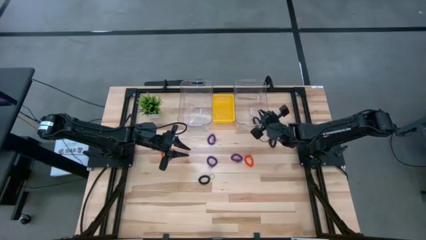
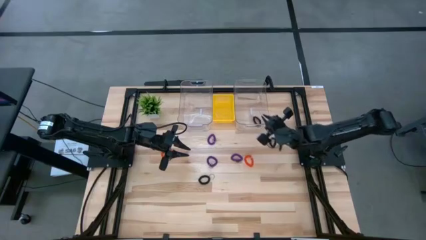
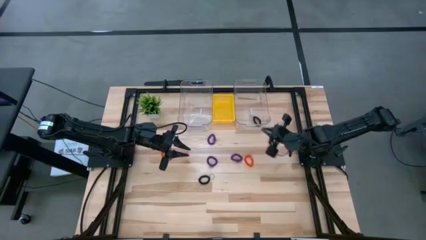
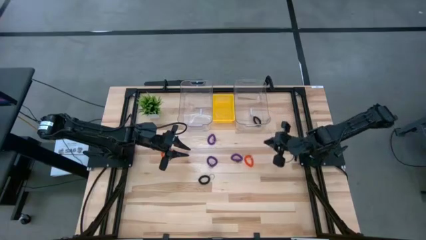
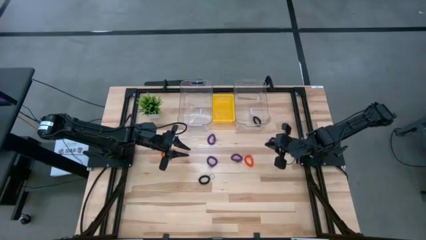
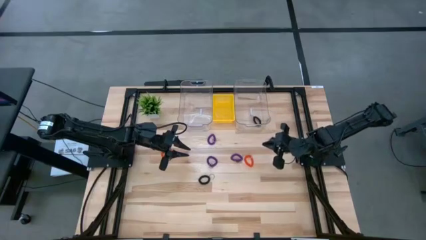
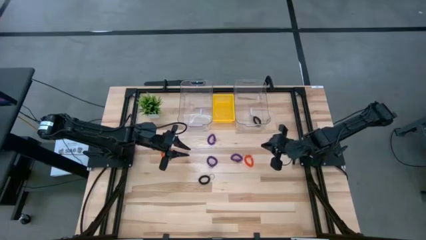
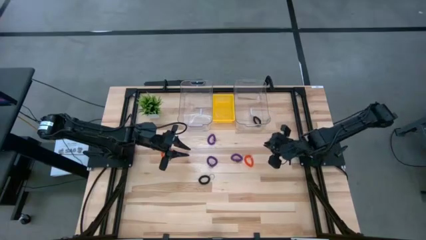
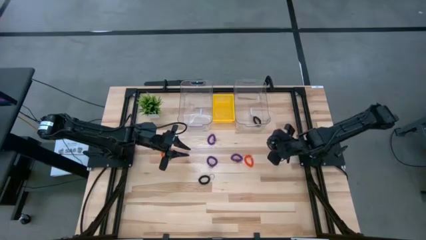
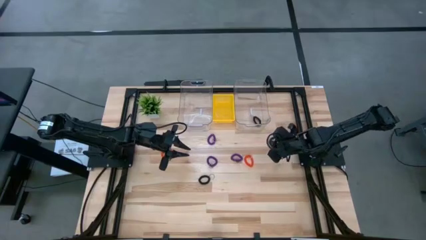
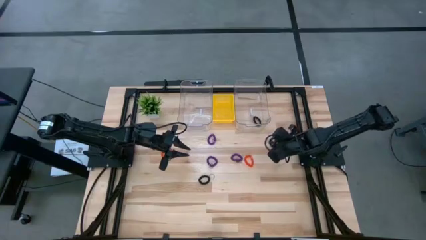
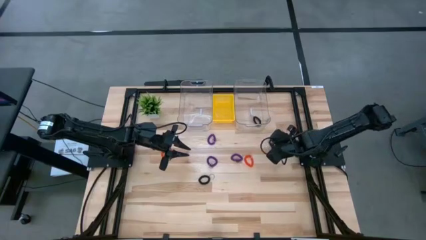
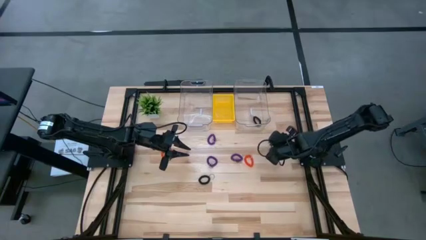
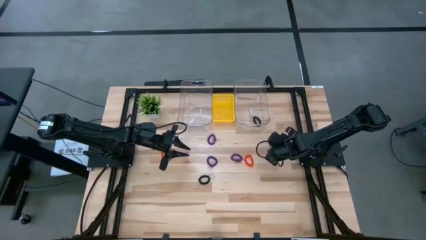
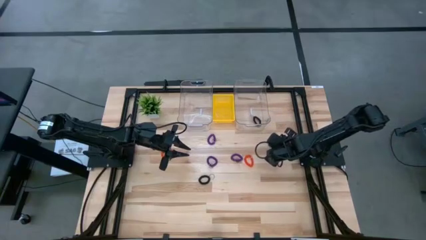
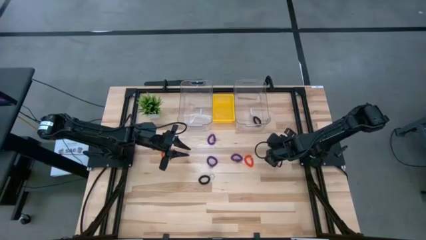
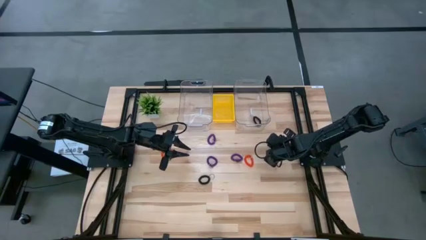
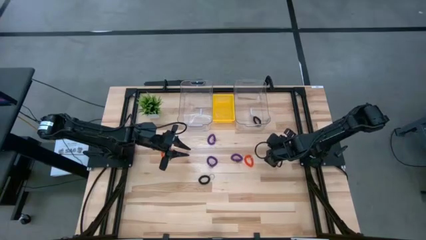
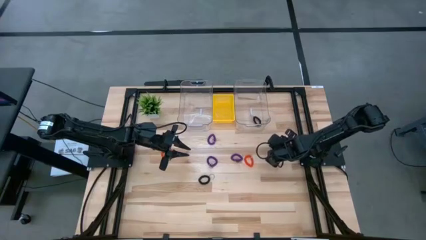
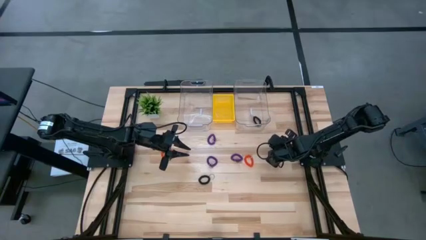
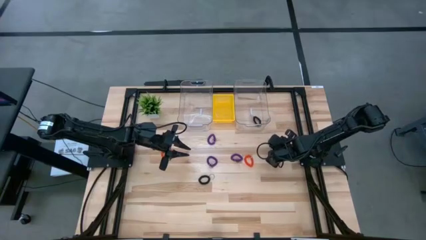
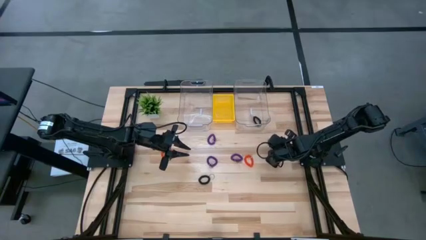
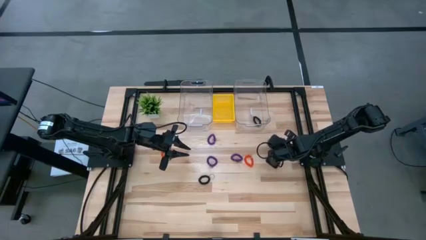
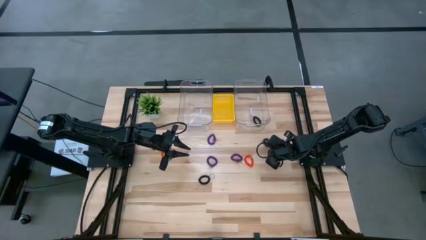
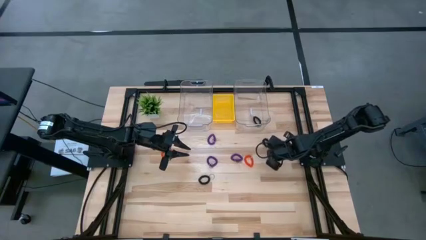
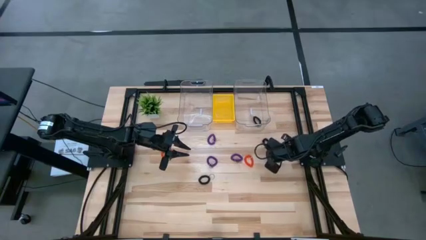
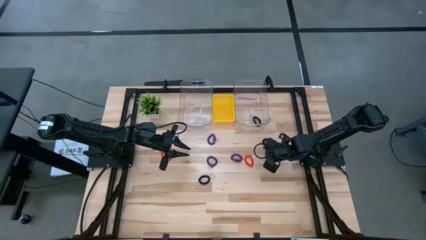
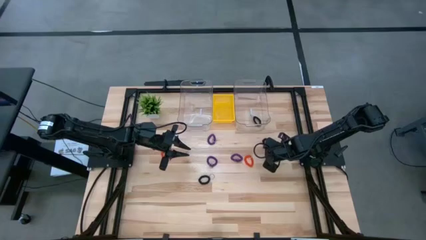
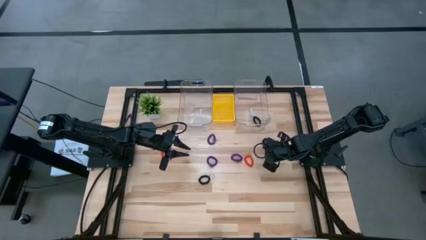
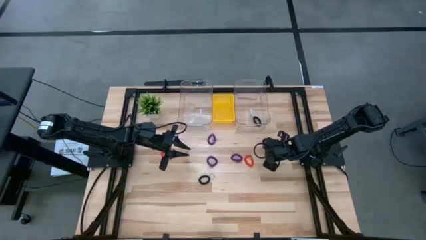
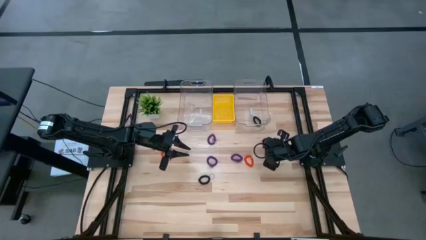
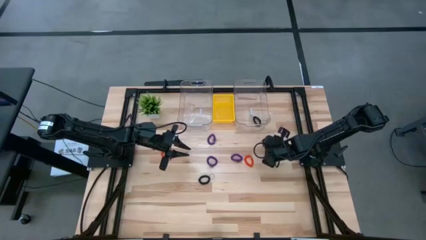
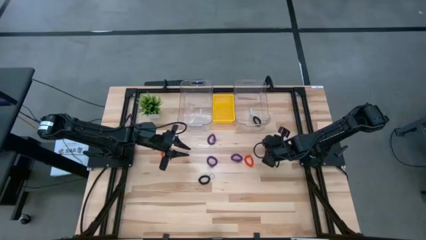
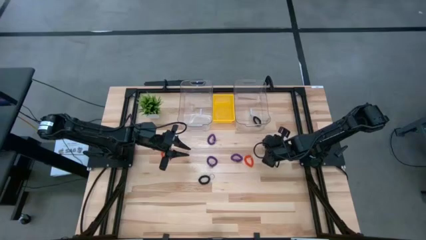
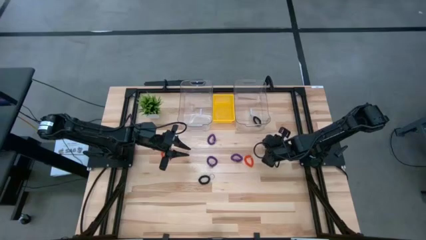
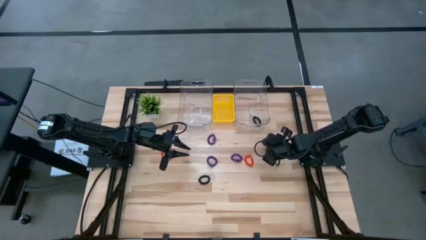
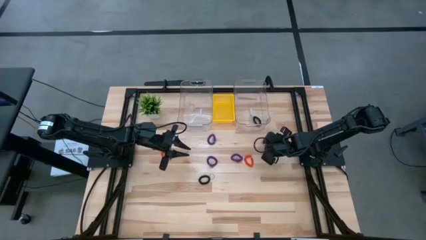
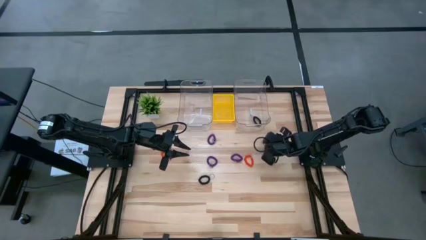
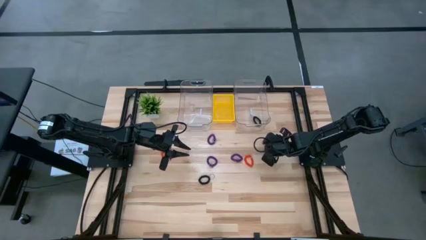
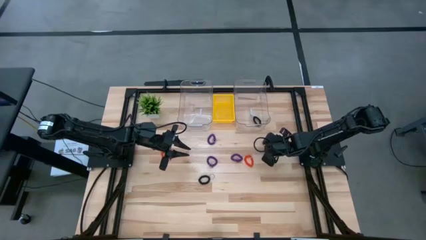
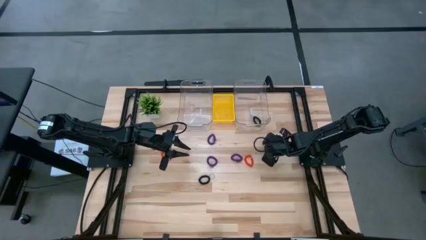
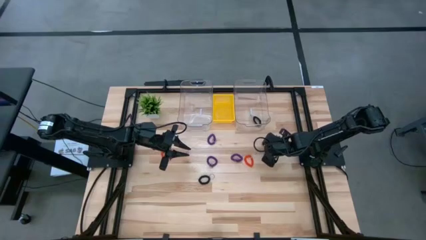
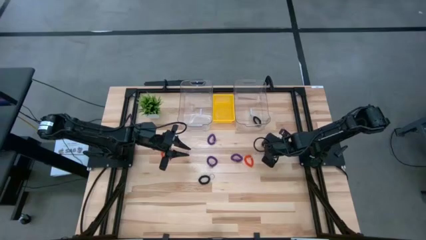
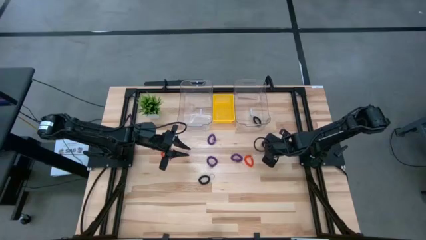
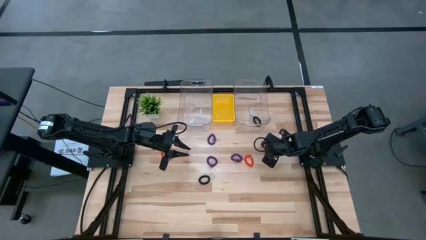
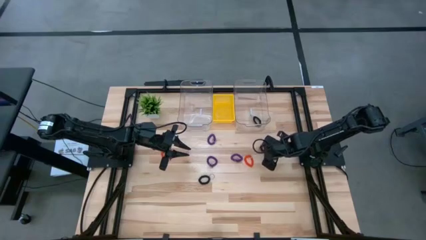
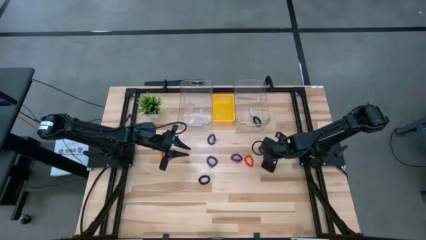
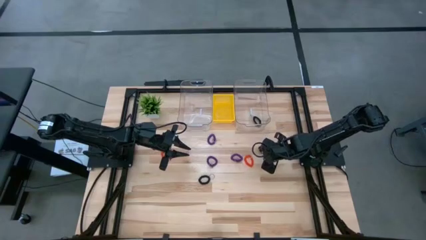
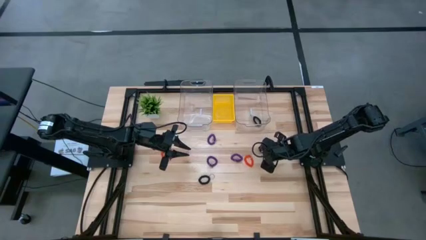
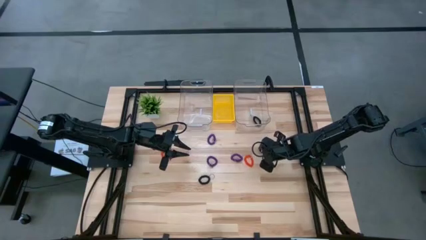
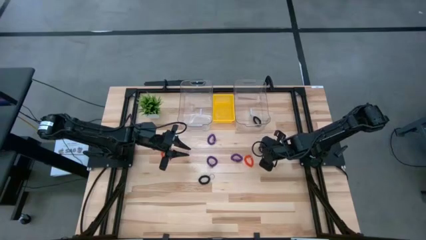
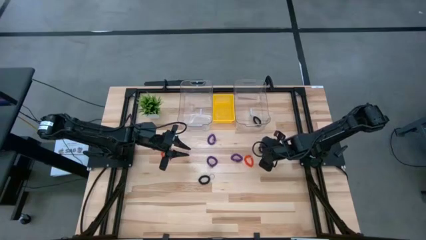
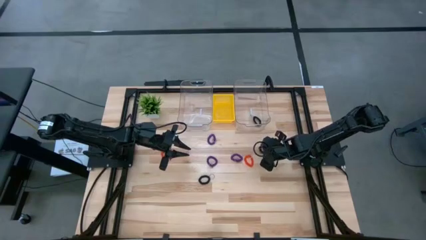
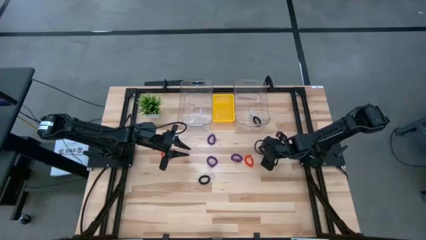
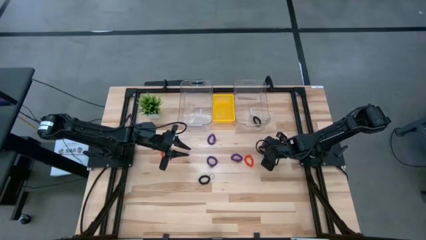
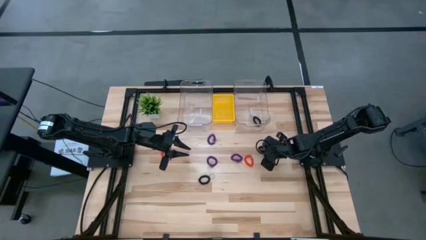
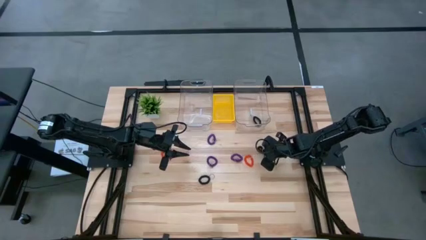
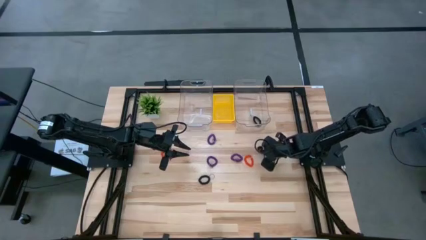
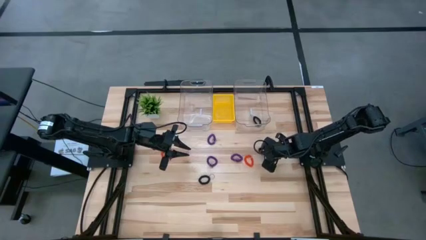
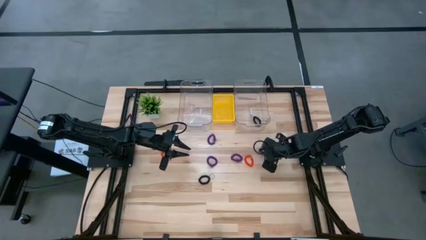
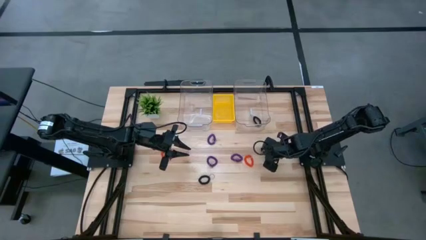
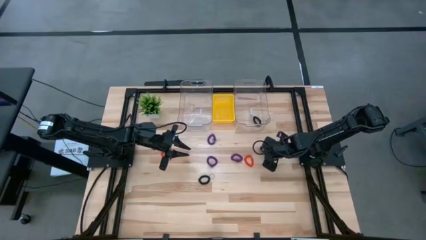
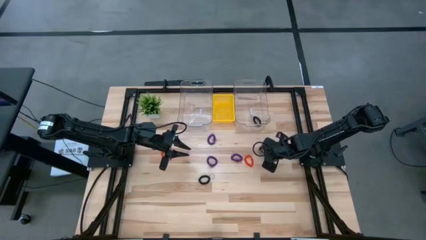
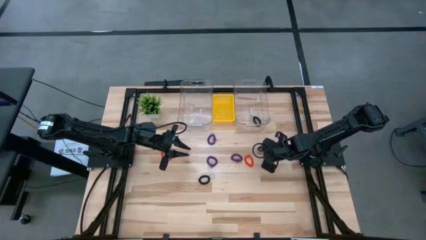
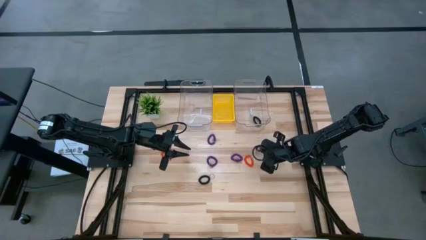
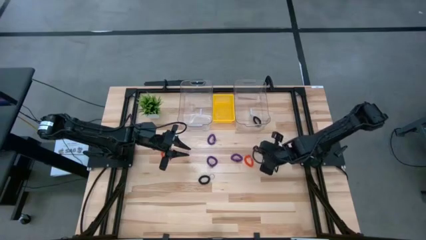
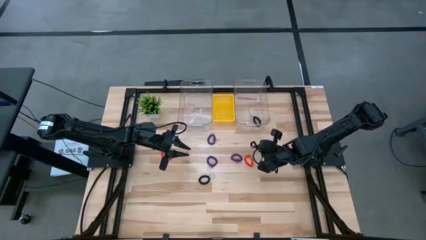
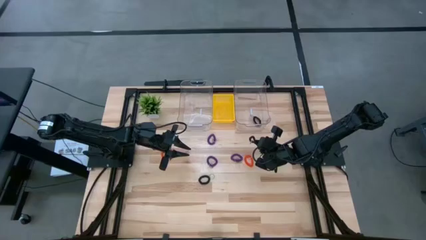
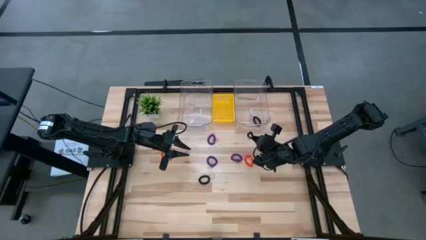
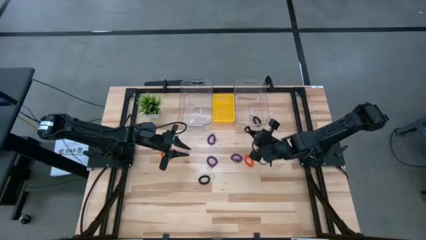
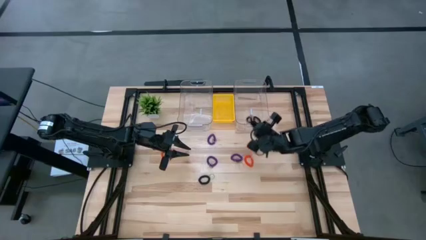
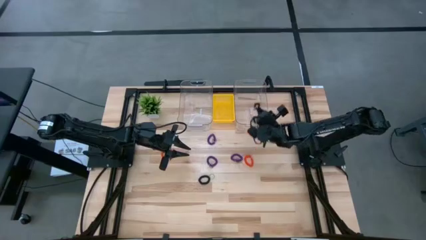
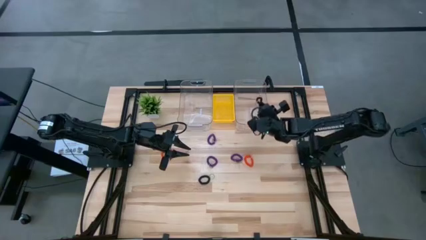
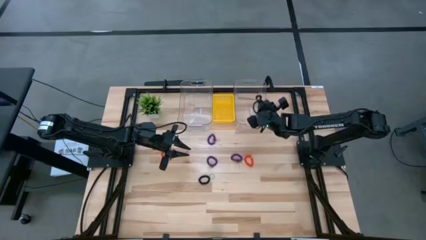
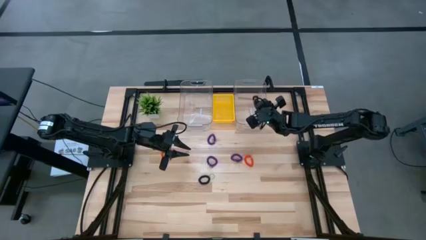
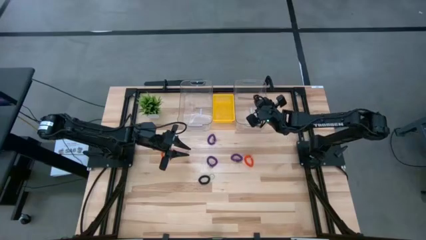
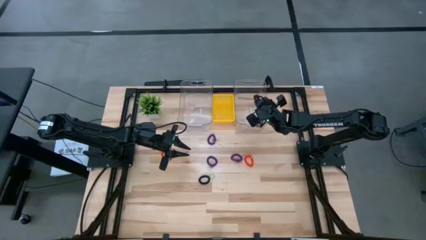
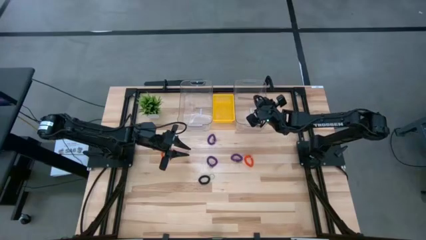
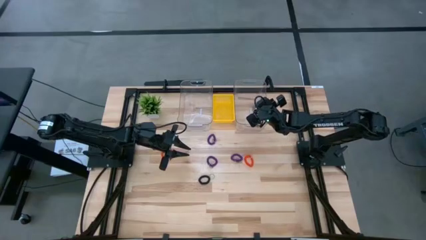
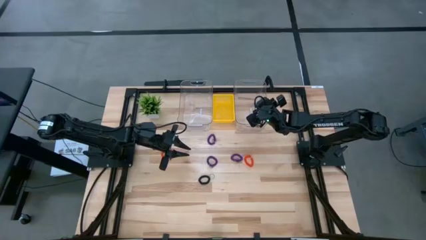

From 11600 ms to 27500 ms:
Task: Sort spring keychains
Put the right black spring keychain into the right transparent bin
